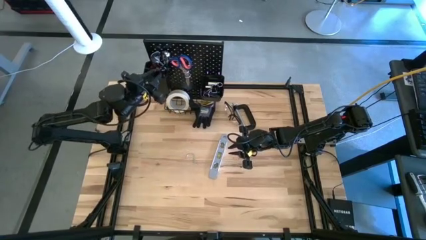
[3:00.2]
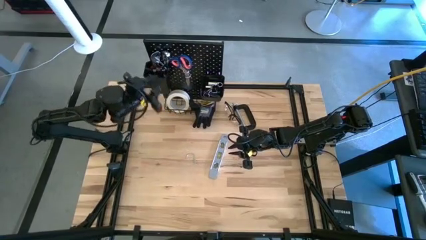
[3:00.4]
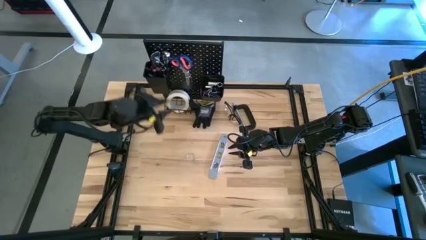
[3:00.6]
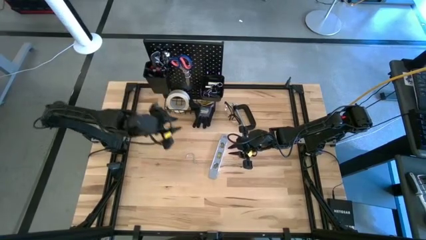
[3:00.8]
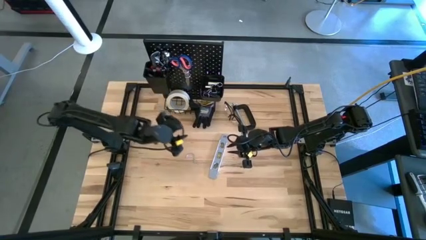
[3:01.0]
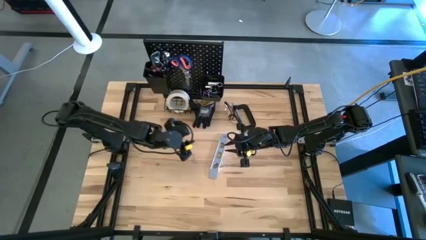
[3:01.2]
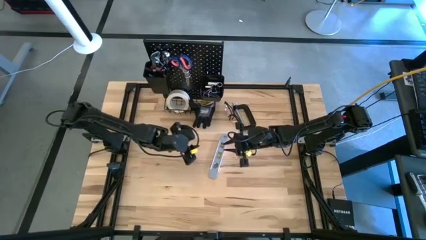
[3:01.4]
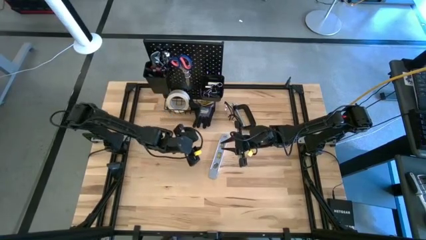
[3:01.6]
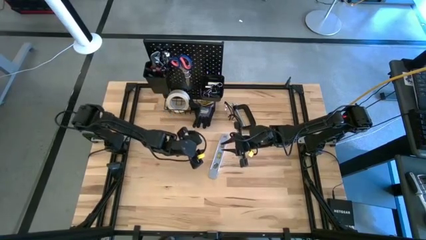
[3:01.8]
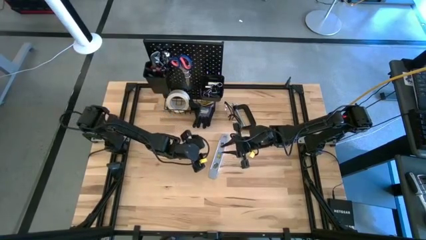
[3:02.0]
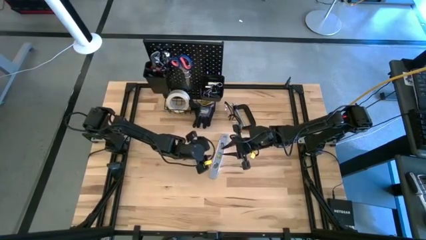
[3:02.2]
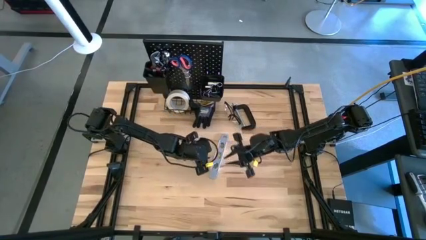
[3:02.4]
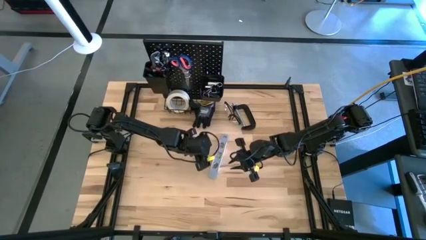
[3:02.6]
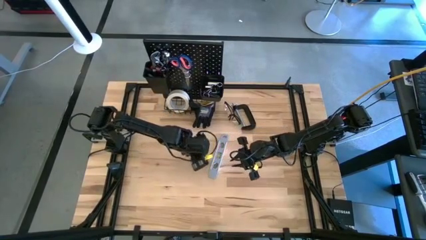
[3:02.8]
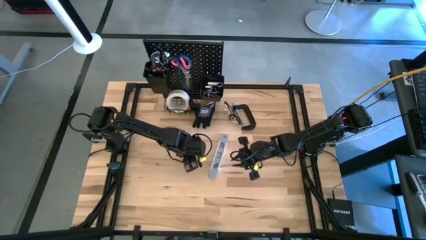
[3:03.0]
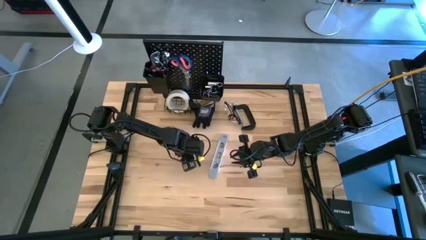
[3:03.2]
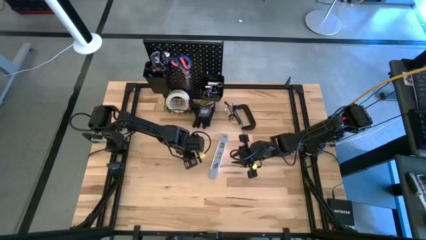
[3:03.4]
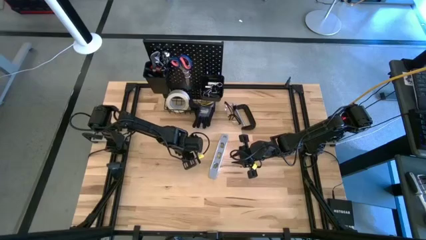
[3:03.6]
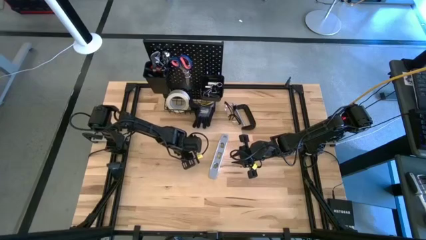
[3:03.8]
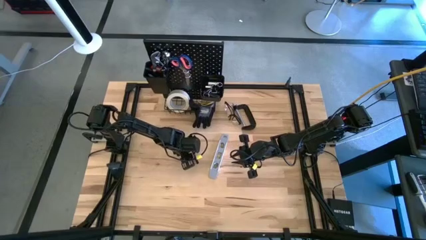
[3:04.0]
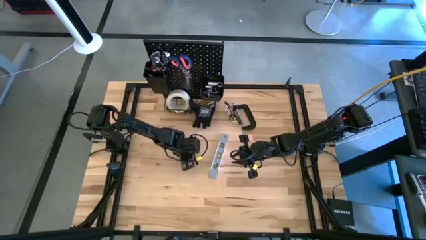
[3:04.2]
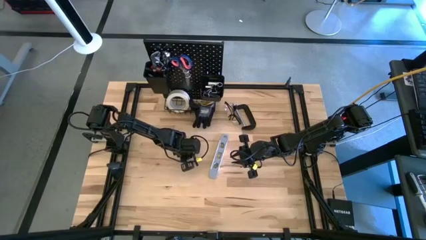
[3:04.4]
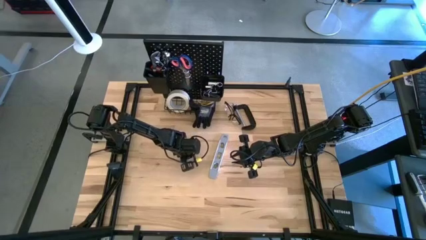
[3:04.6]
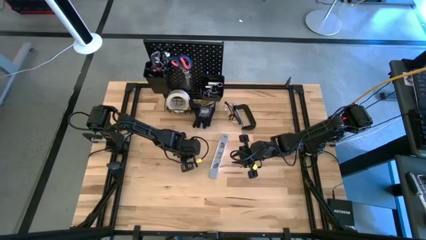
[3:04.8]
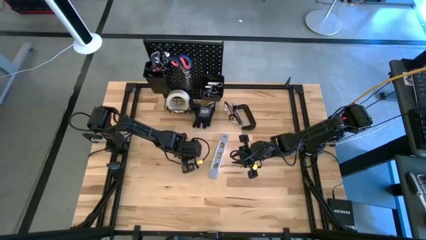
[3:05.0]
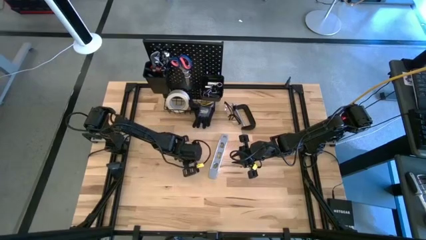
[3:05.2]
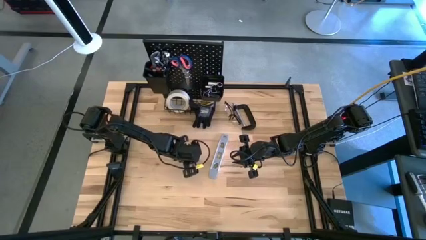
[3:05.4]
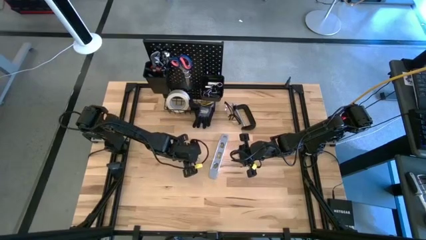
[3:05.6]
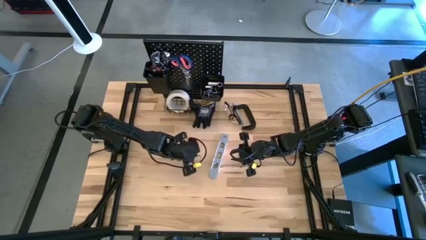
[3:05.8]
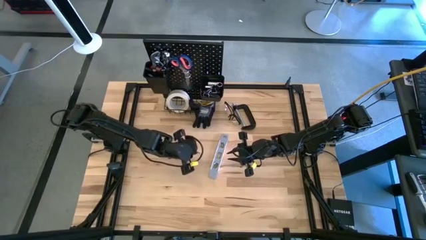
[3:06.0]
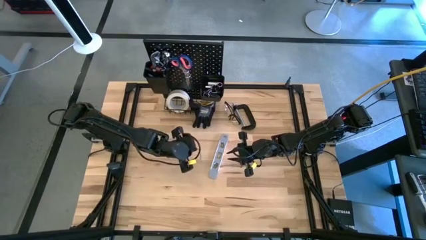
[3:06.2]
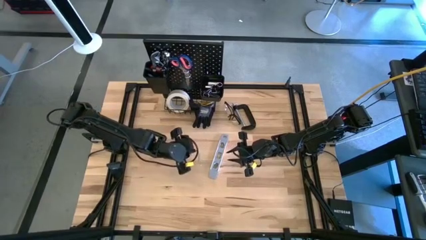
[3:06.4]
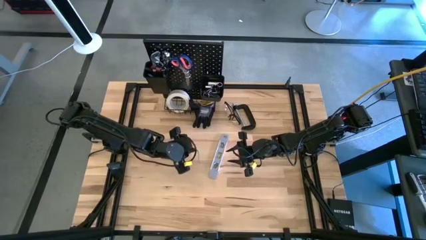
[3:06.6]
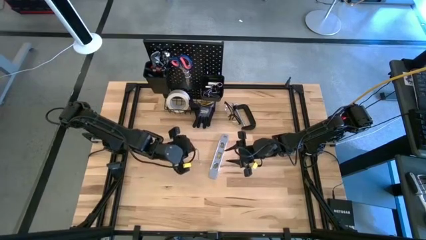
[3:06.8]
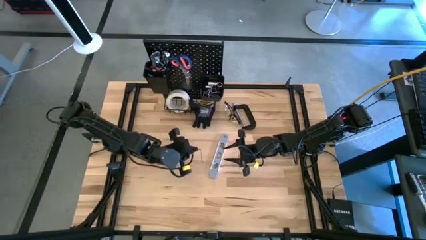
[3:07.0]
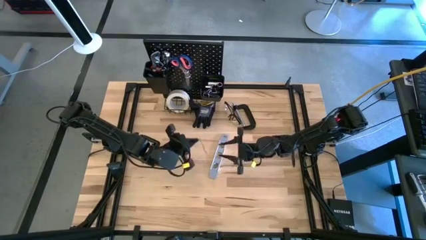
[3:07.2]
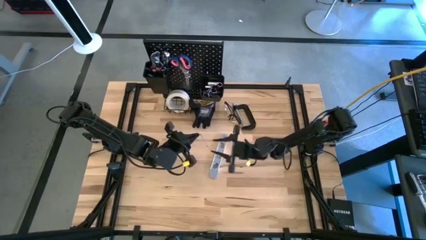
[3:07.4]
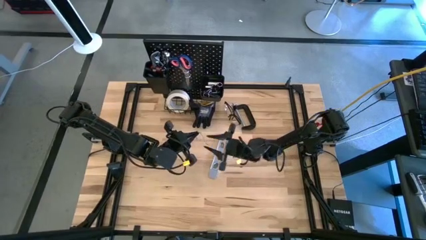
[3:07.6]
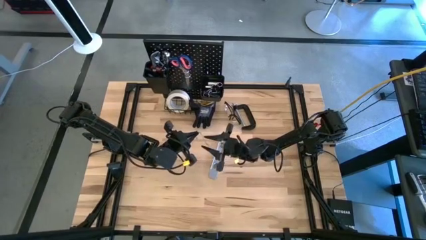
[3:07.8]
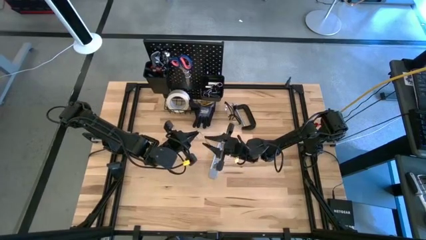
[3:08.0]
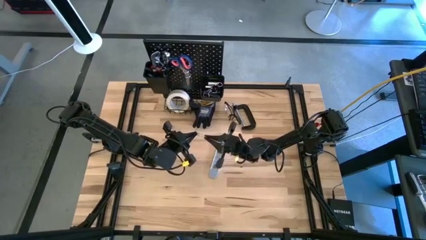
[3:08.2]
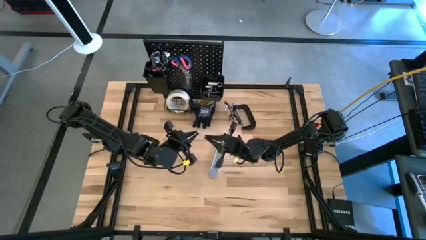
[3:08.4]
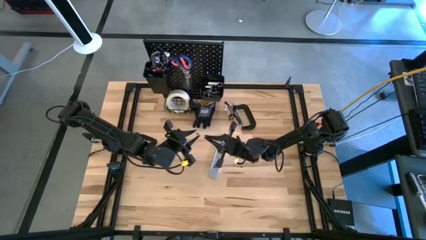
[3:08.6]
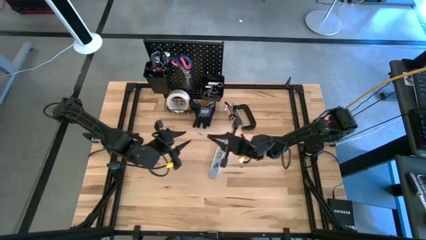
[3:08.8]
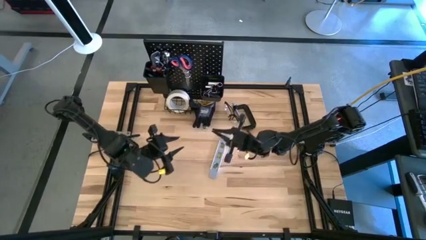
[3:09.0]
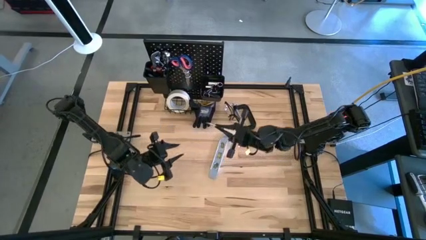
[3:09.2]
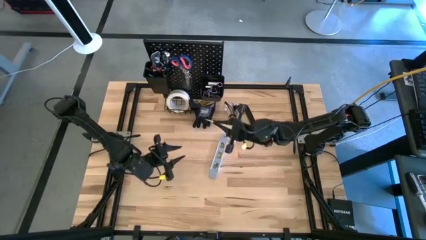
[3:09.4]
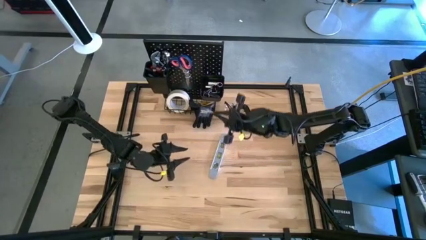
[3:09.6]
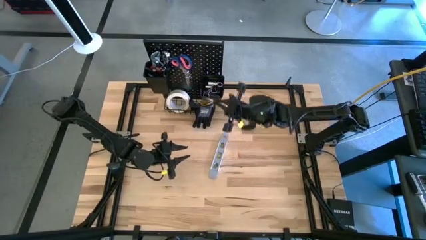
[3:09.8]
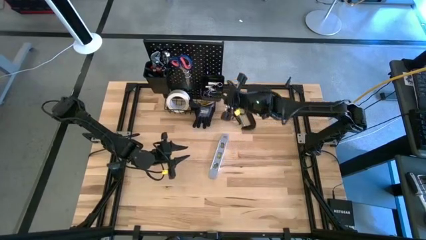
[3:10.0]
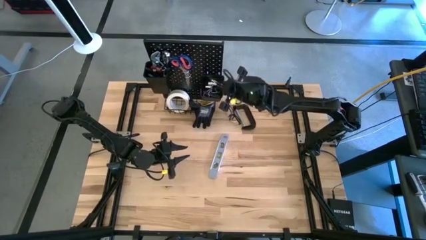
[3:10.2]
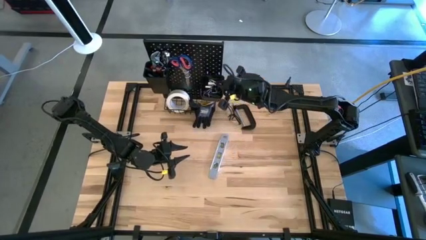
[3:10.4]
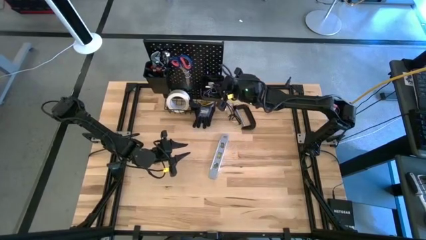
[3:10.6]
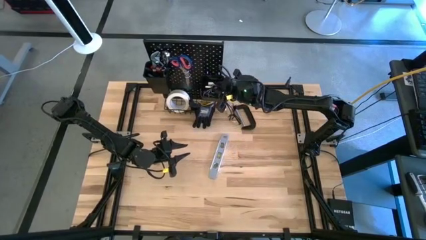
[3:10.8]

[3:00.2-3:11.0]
Task: Hang tools onto peg board
Put the hanger hook into the right black bin on the pegboard

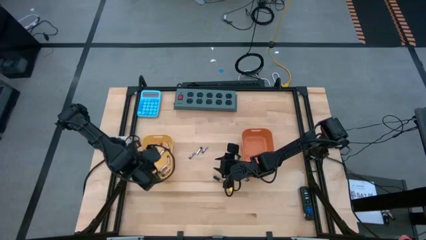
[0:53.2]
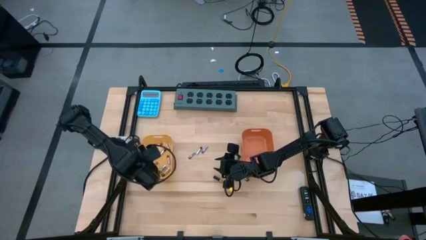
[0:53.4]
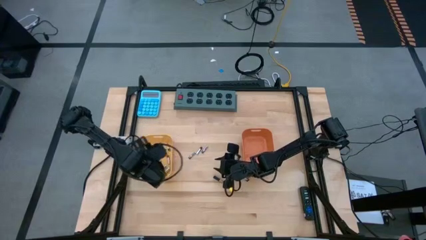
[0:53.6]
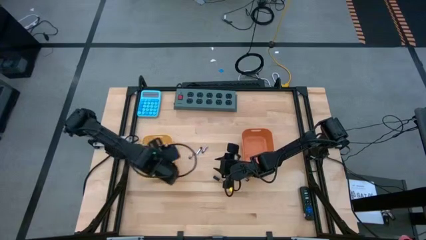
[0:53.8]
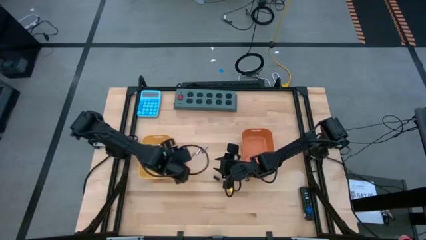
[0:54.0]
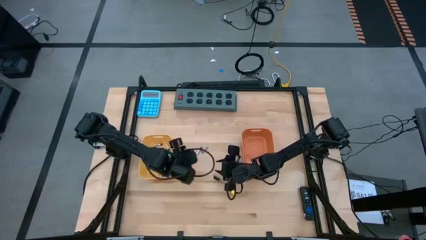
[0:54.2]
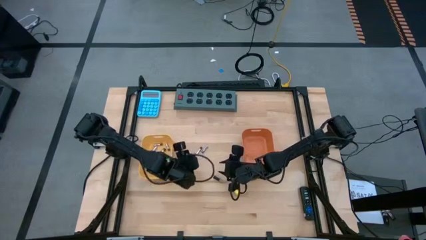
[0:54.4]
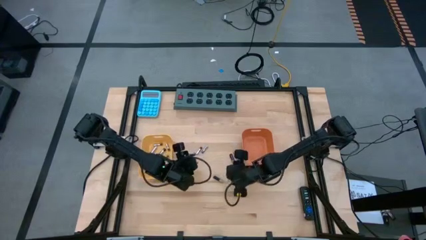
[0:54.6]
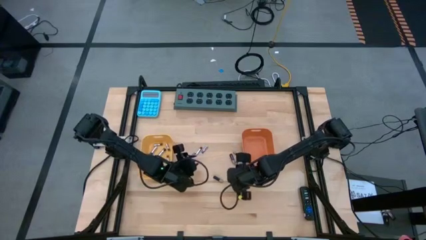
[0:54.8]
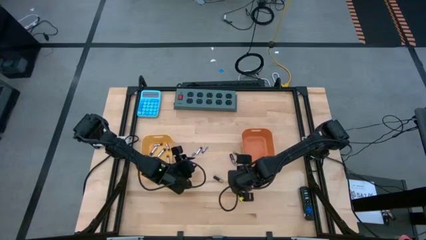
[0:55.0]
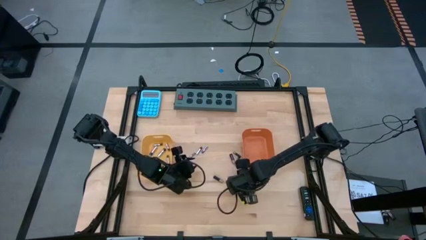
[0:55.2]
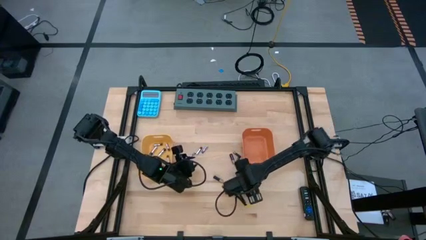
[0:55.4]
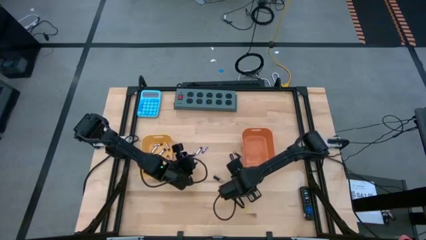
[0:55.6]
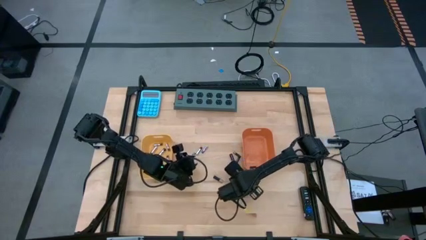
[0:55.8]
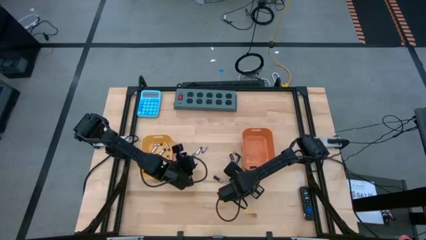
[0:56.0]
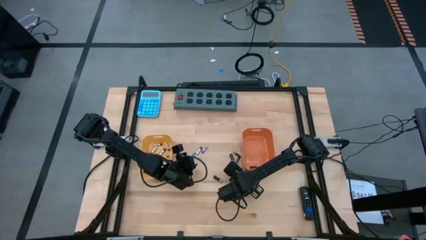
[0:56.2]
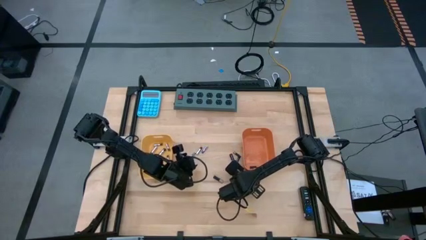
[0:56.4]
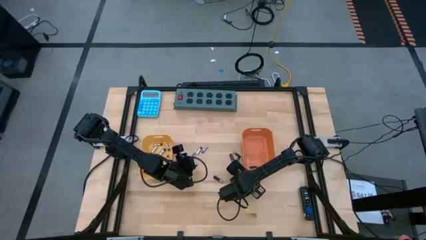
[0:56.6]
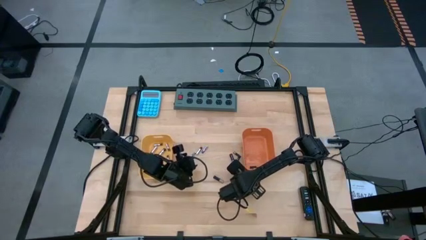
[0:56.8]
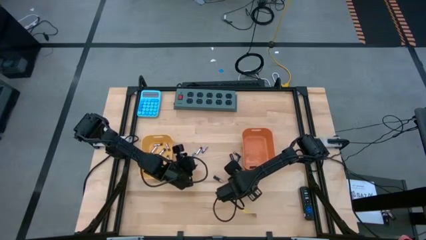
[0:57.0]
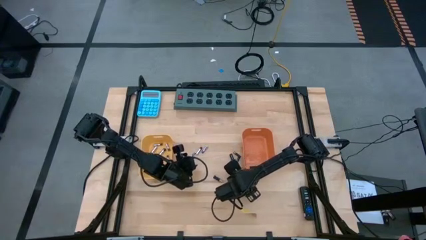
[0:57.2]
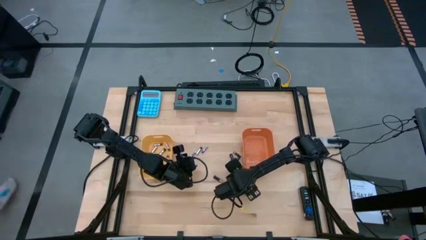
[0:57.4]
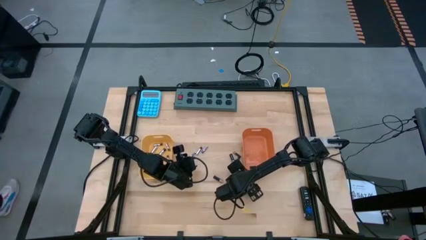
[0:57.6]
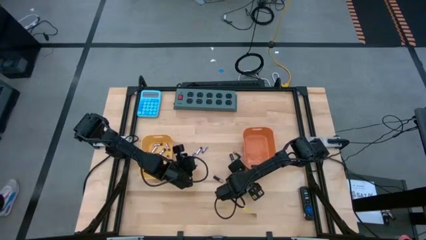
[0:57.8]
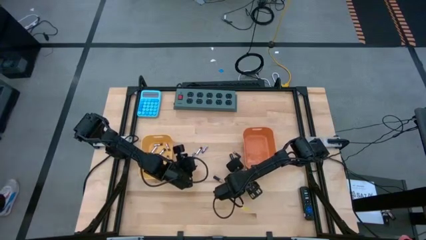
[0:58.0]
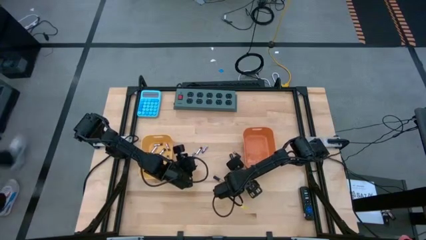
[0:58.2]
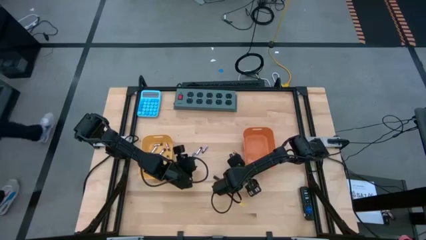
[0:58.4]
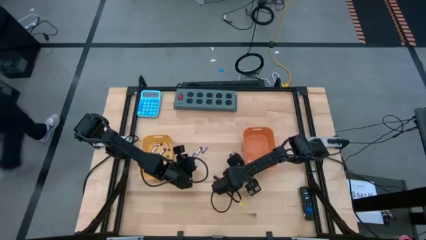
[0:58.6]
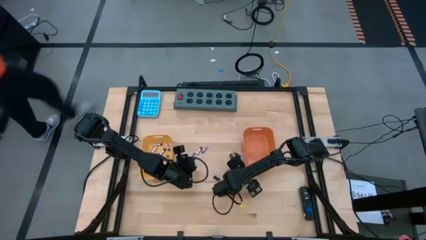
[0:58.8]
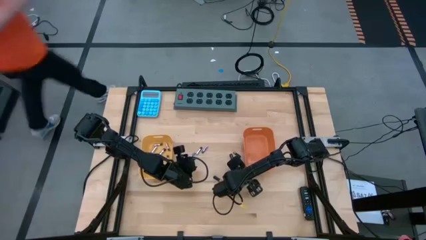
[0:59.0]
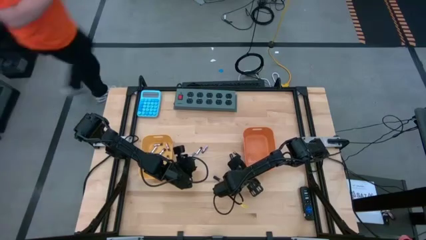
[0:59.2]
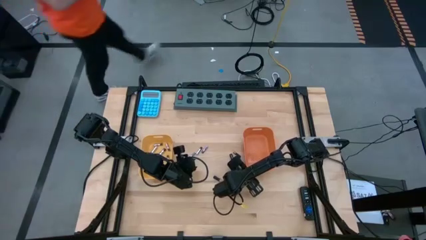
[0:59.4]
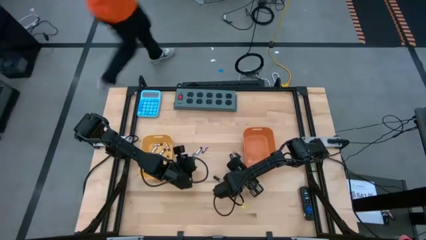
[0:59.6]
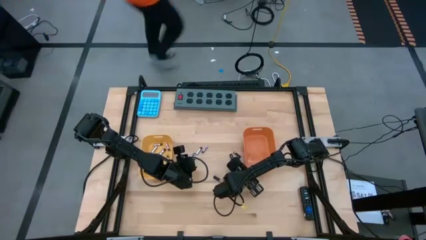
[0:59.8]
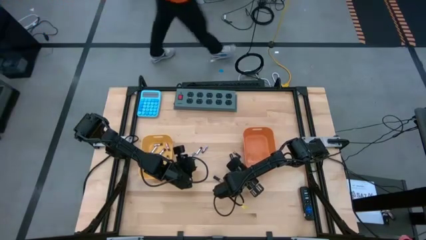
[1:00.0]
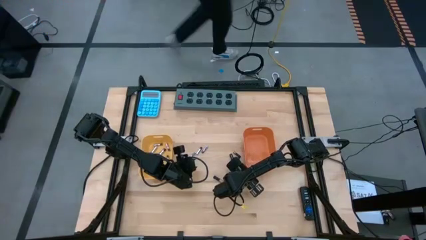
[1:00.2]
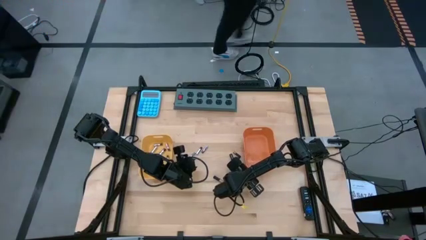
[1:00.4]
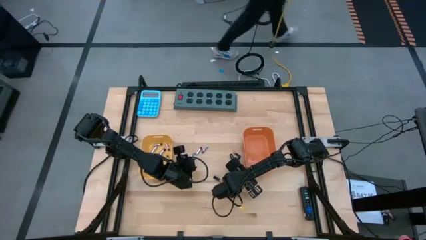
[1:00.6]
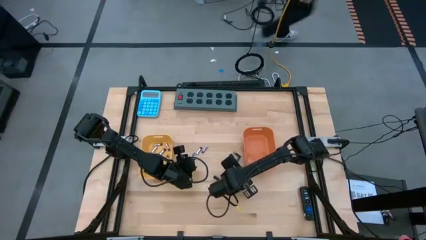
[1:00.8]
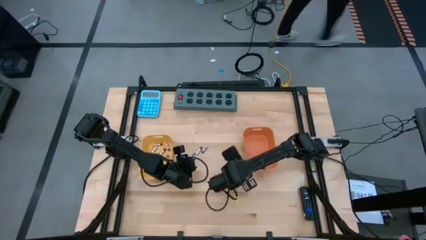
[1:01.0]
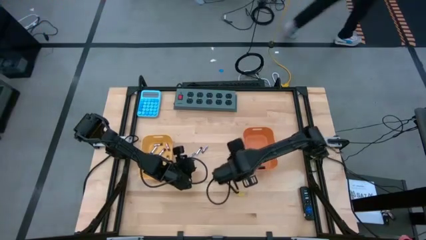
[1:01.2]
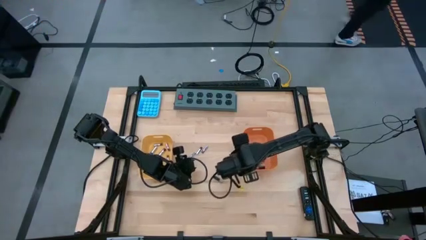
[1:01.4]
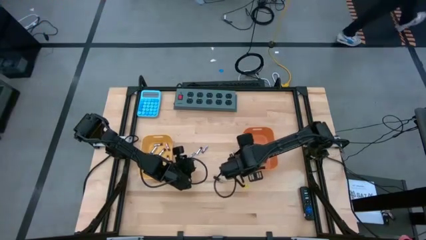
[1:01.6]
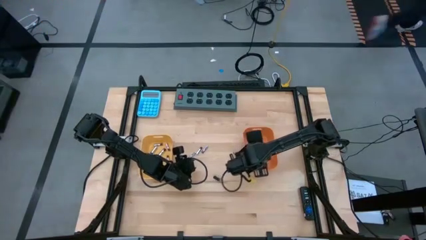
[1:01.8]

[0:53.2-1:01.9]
Task: Sort batteries
Put the silver battery into the yellow bin
